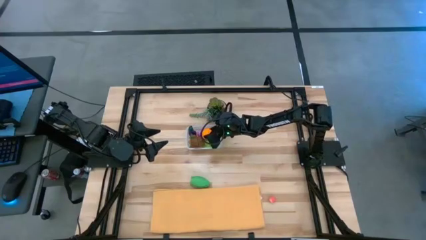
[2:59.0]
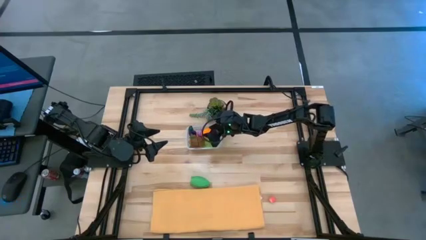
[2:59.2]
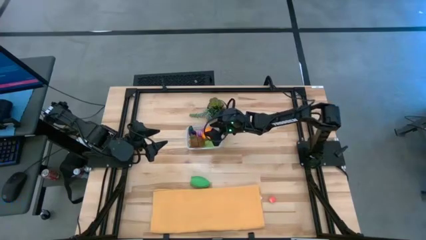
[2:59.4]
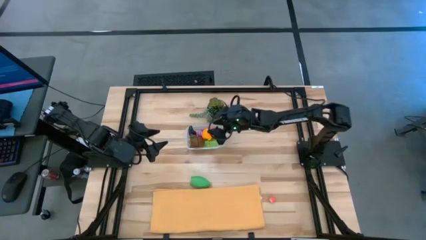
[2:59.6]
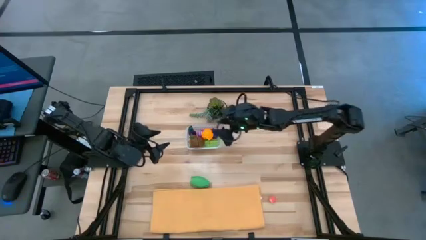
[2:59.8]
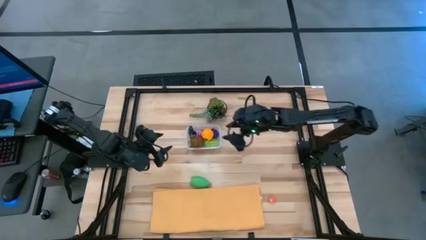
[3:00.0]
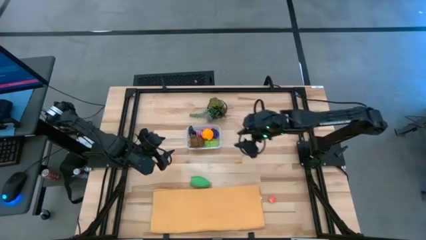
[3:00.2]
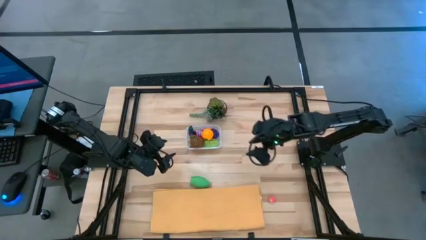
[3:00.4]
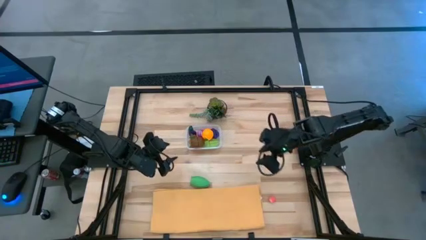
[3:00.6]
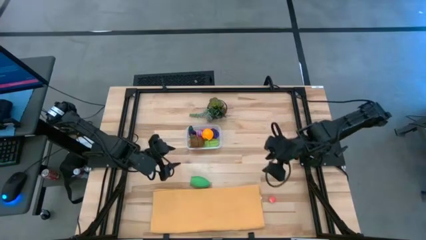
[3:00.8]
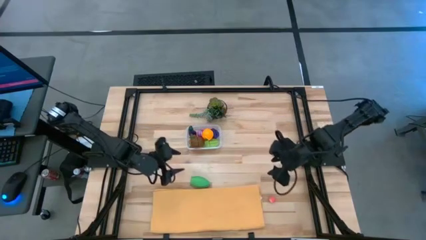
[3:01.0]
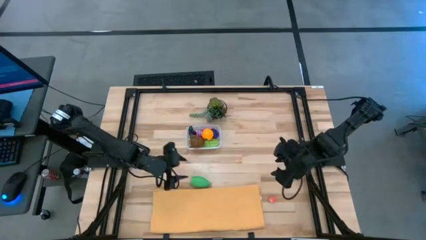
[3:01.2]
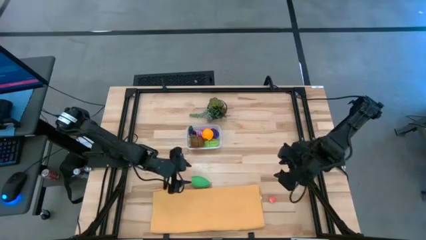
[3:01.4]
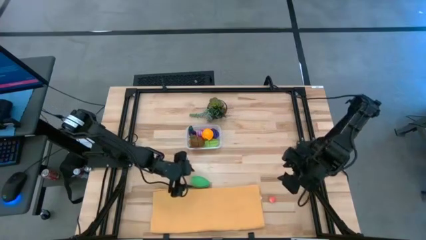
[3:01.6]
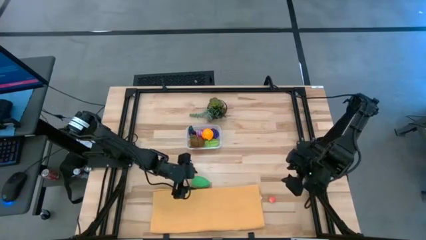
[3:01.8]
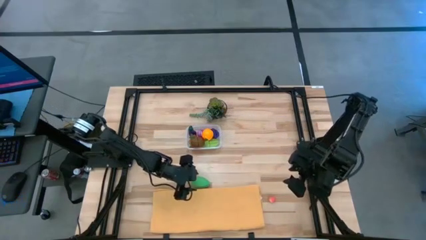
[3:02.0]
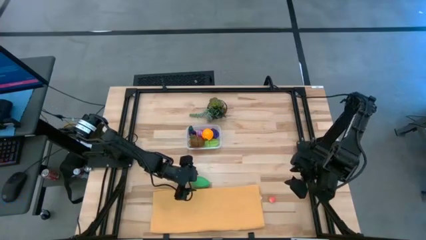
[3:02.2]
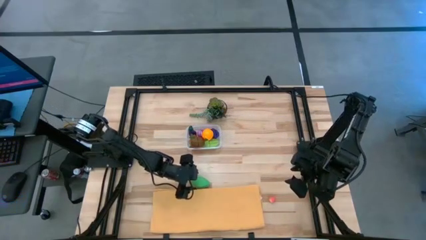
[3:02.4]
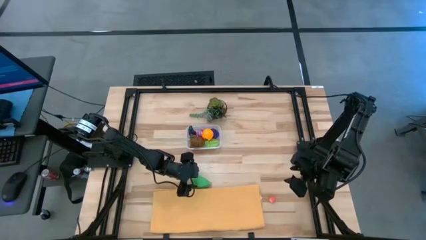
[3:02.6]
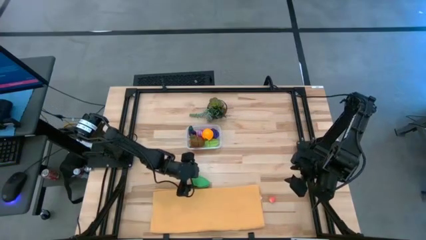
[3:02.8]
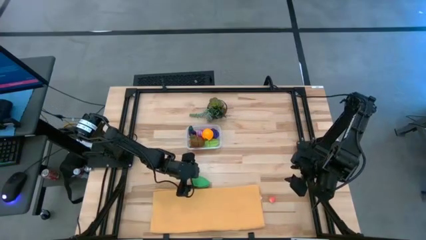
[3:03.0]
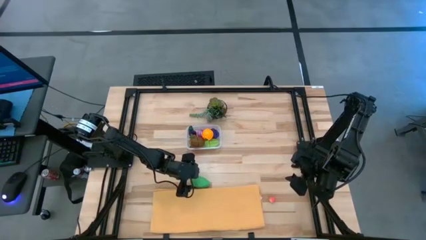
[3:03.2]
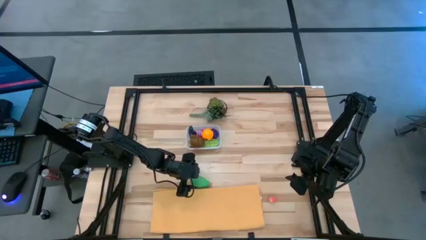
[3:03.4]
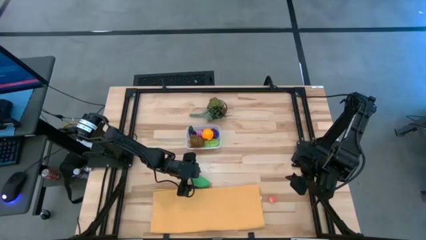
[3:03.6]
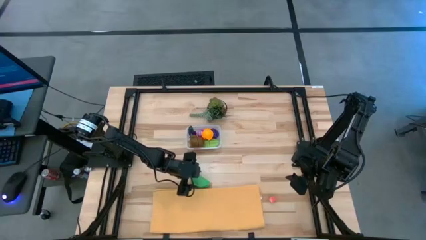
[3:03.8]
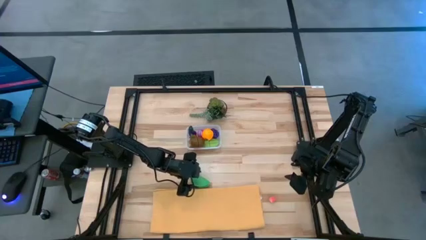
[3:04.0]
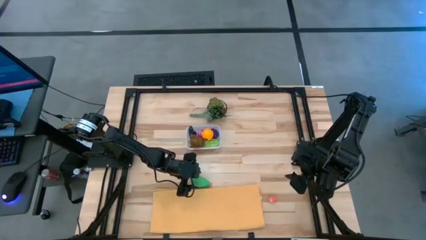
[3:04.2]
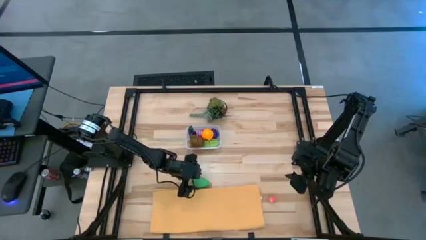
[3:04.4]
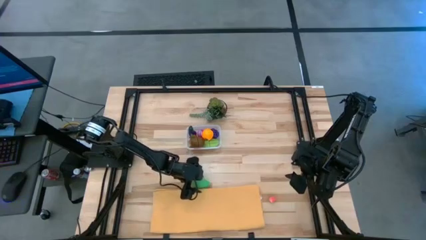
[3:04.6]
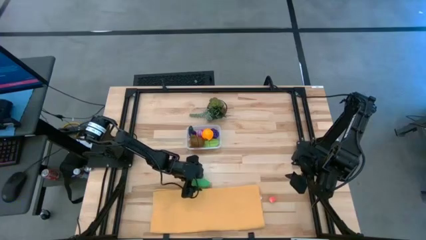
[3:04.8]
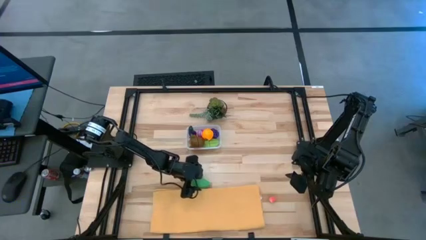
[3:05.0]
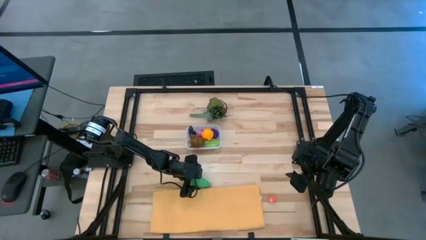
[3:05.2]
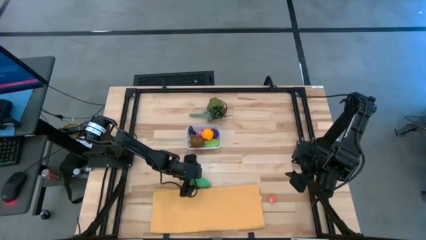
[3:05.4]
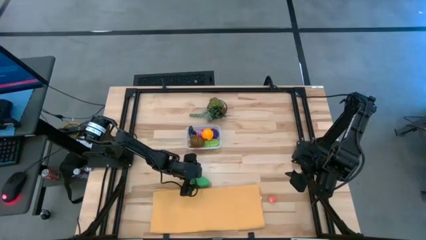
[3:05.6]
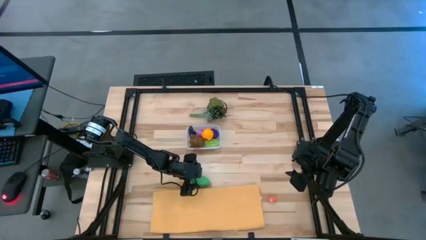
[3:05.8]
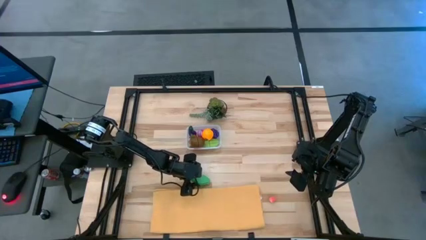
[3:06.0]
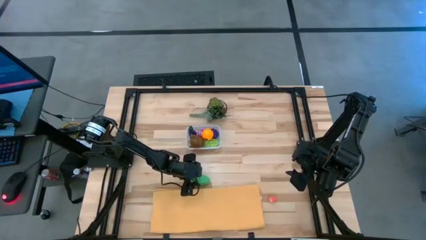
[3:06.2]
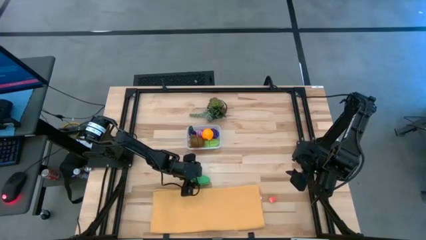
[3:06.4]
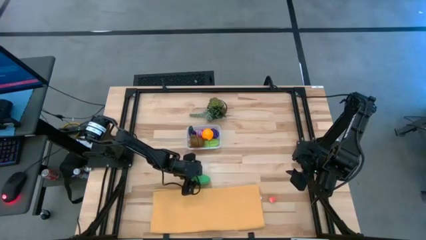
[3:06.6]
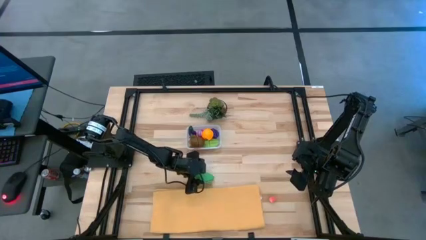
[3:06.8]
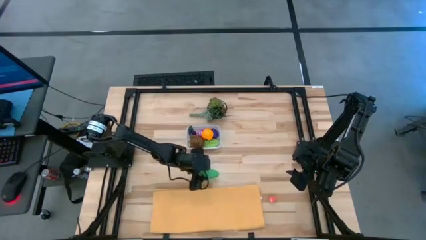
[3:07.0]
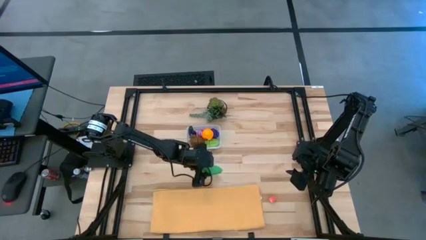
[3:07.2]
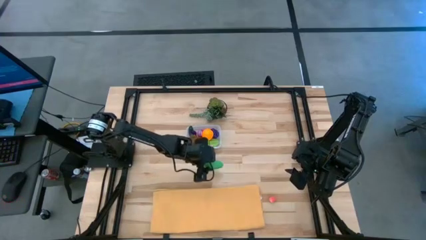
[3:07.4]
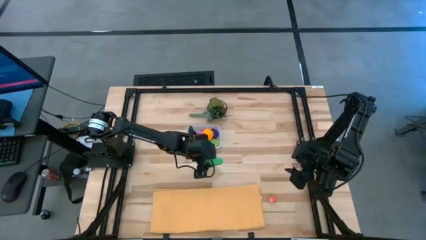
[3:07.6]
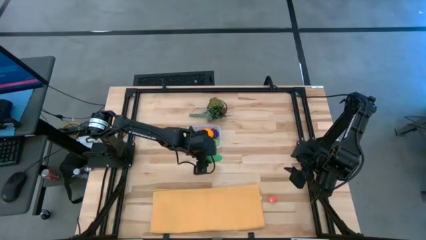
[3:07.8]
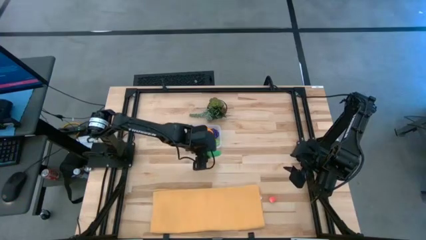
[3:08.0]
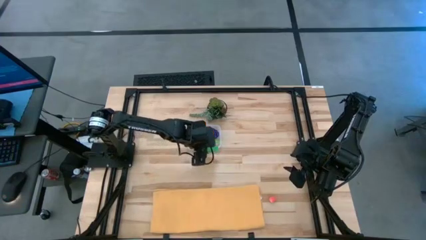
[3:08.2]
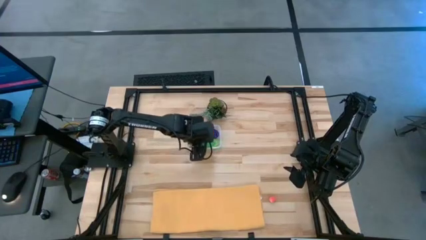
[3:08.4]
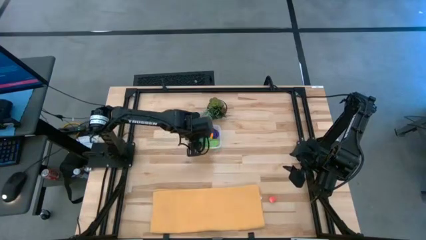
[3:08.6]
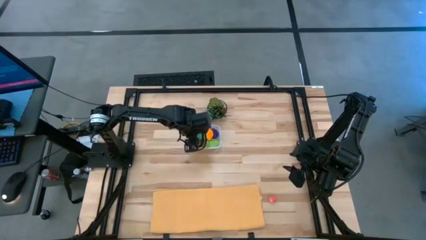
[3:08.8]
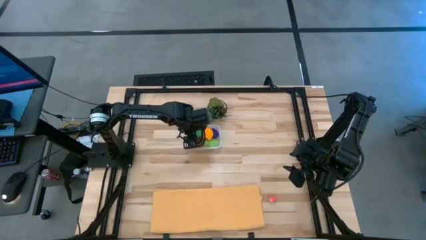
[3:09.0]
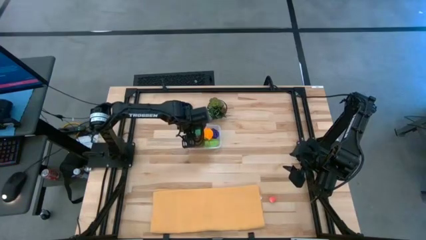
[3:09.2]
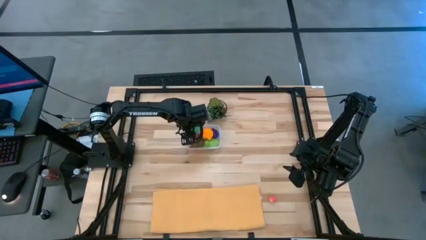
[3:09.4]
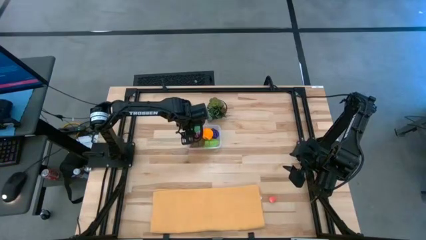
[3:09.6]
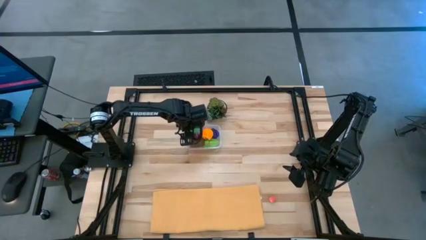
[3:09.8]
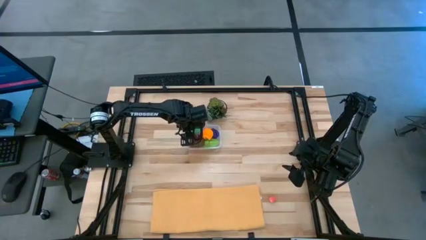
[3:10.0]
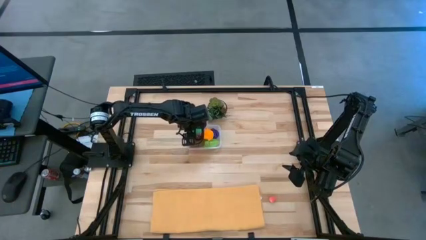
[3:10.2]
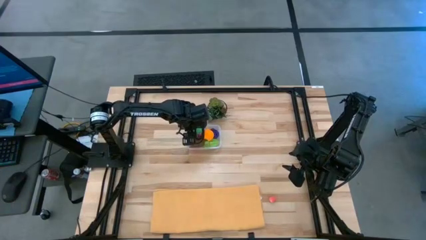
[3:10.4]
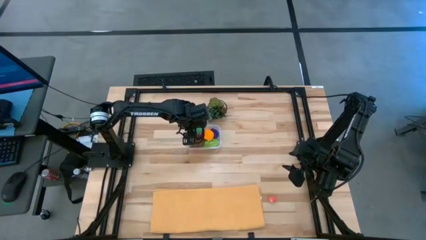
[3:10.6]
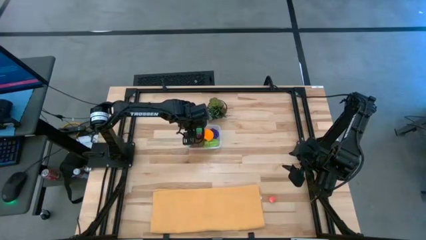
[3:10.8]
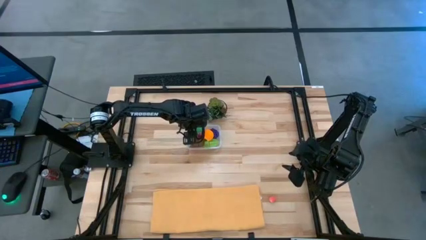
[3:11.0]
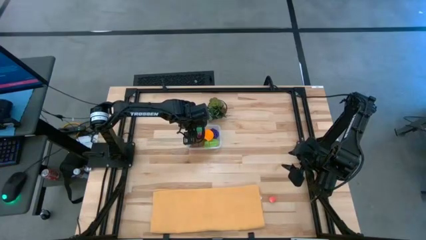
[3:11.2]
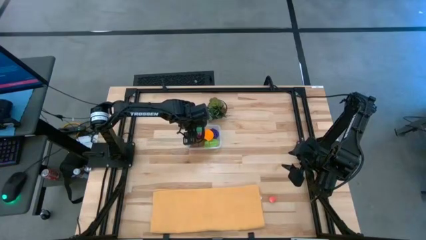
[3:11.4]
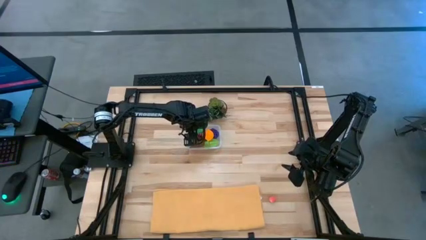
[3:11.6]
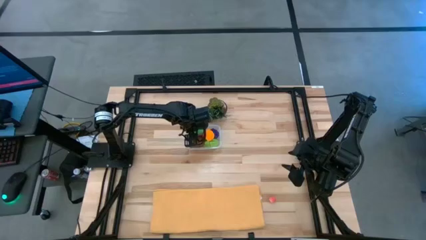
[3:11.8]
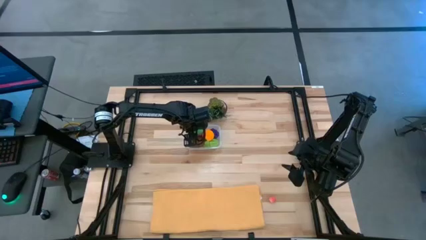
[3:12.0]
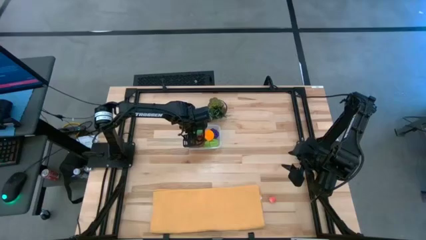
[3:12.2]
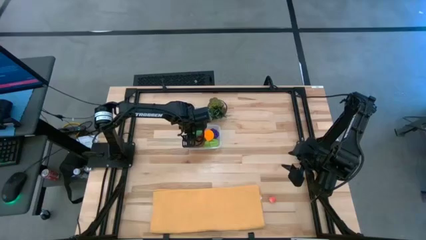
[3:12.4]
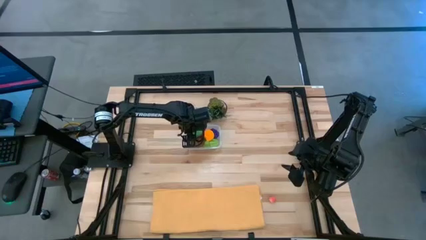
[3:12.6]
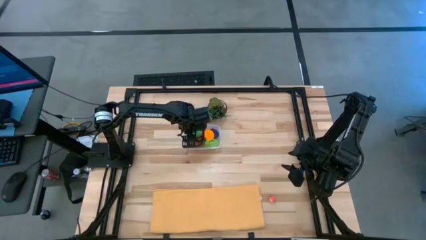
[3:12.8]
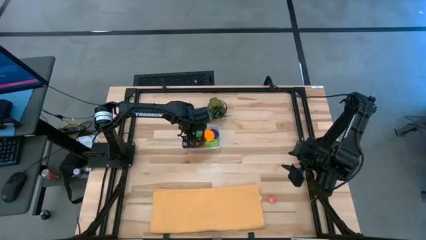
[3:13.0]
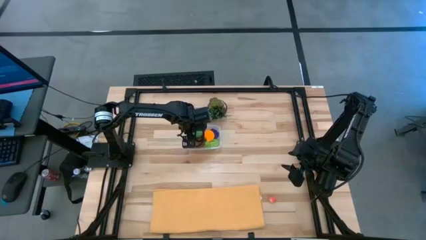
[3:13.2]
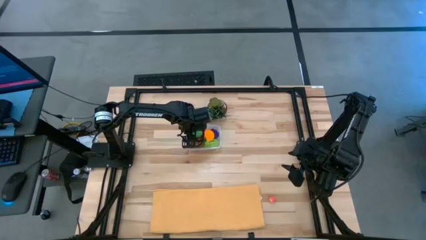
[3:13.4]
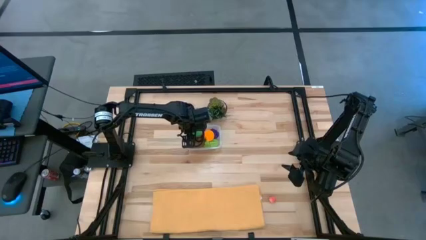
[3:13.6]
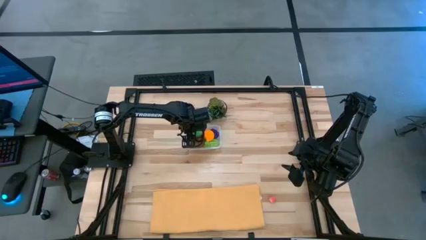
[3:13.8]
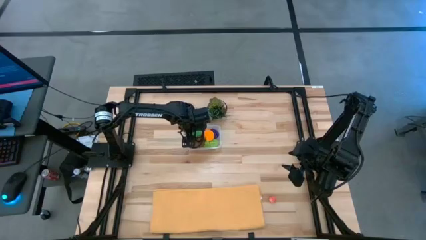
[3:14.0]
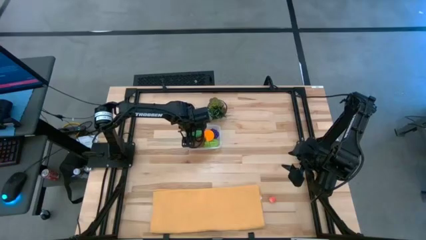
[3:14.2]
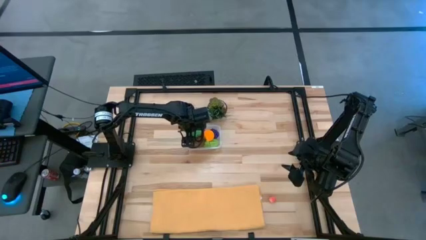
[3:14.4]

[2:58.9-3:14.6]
Task: Pick and placing Produce into tupperware
Put the green corn into the transparent bin

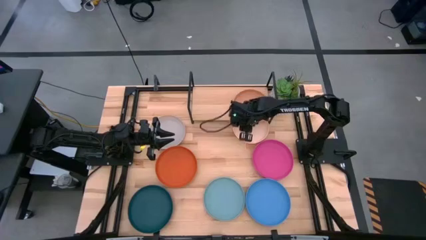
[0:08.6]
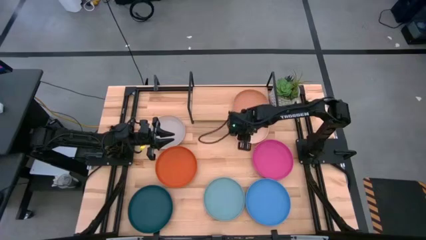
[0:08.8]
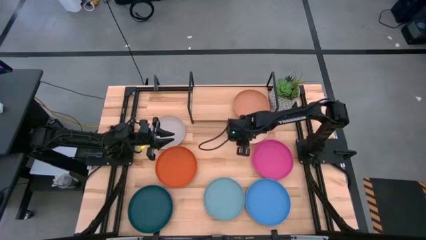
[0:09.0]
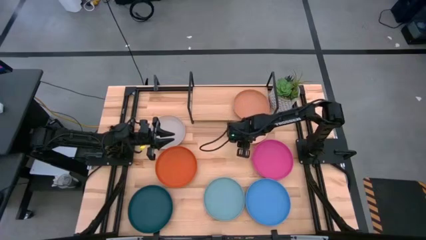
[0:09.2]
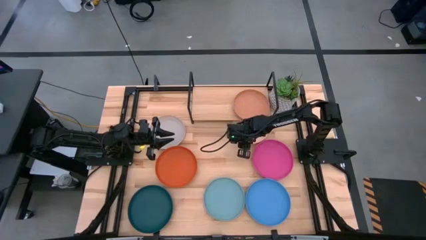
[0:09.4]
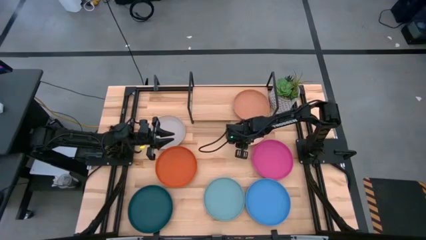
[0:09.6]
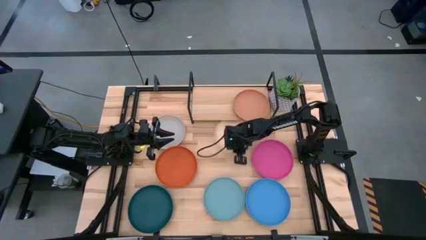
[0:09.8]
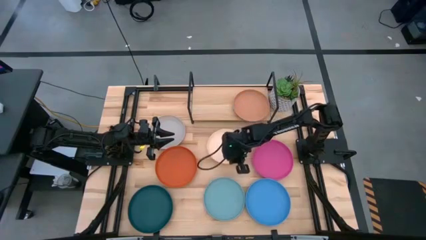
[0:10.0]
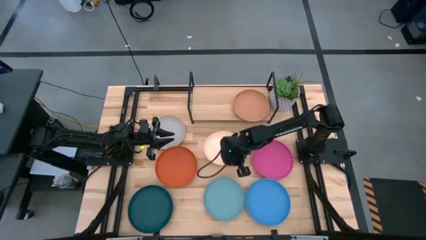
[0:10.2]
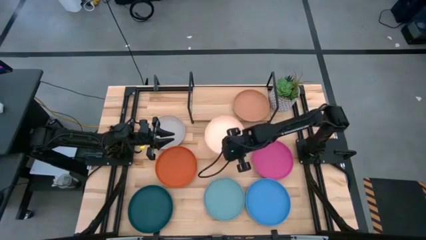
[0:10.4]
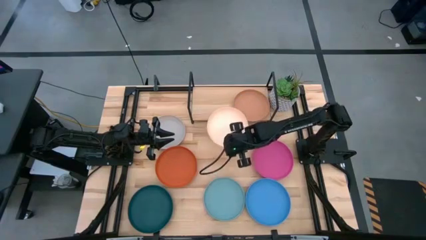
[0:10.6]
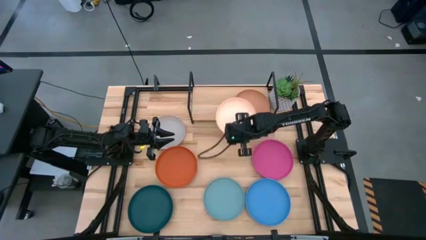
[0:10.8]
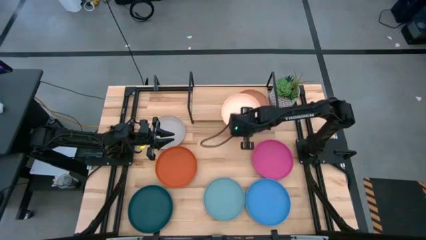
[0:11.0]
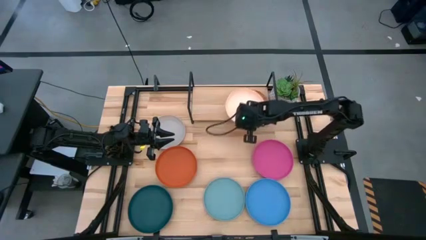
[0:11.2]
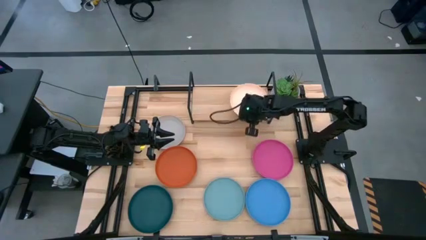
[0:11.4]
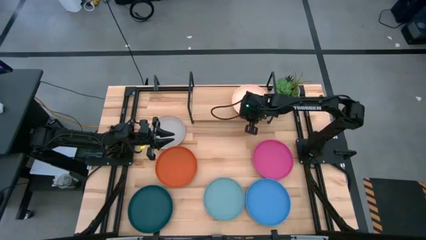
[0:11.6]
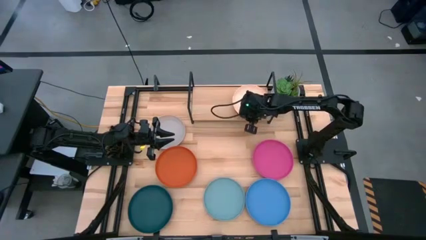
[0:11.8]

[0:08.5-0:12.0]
Task: Place and stack plates onto a shelf
Stack the white plate on top of the brown plate on the shelf
